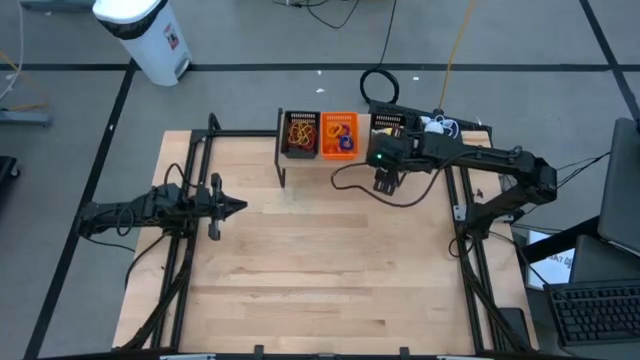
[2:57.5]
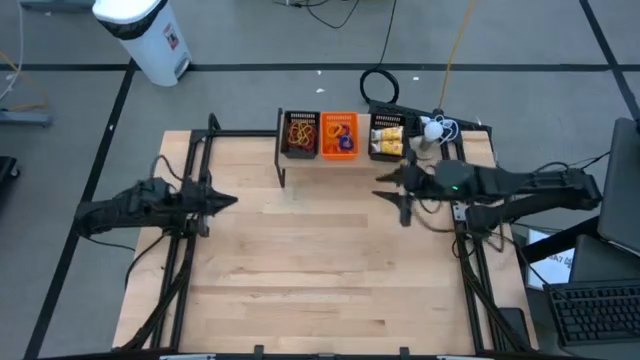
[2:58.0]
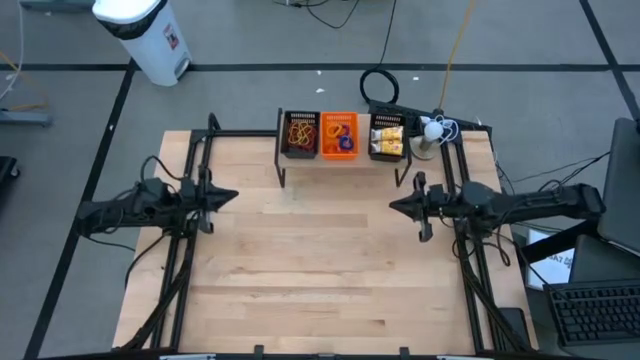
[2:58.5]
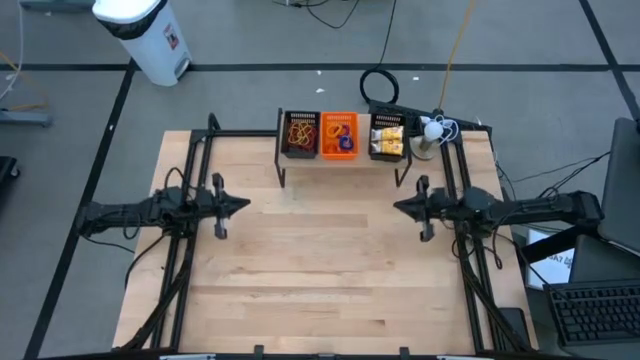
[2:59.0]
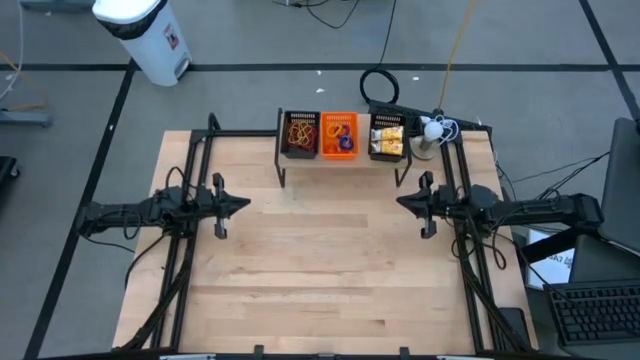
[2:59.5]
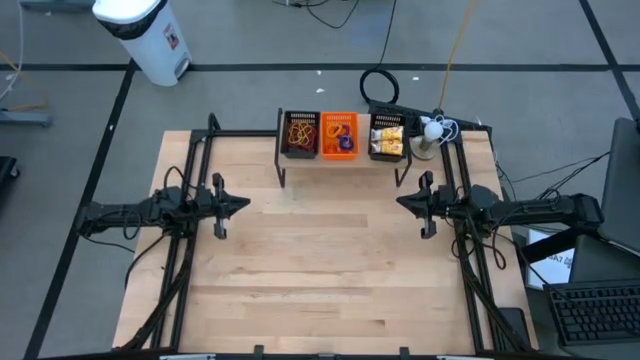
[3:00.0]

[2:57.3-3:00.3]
Task: Pick & Place Office Desk Supplies
Return to Home Position

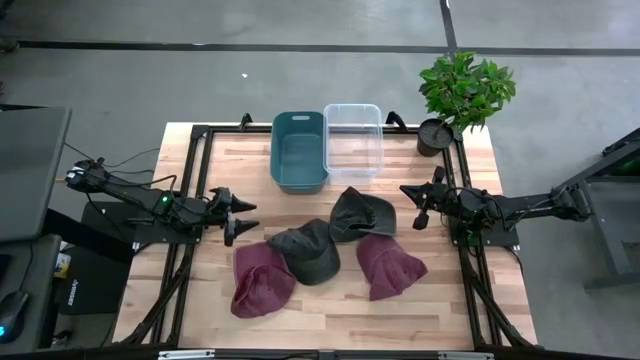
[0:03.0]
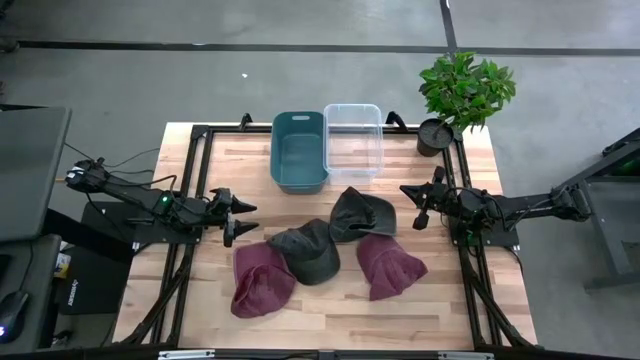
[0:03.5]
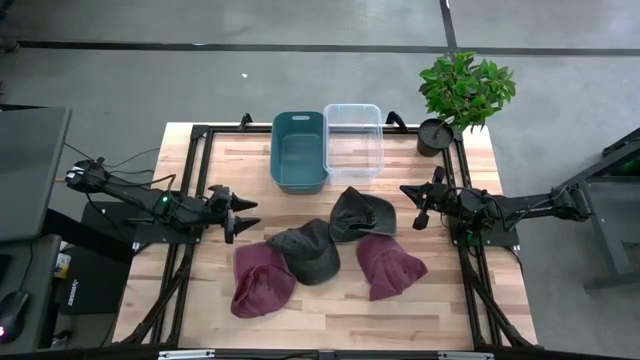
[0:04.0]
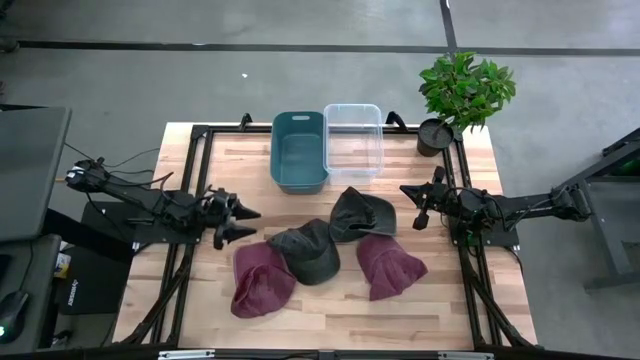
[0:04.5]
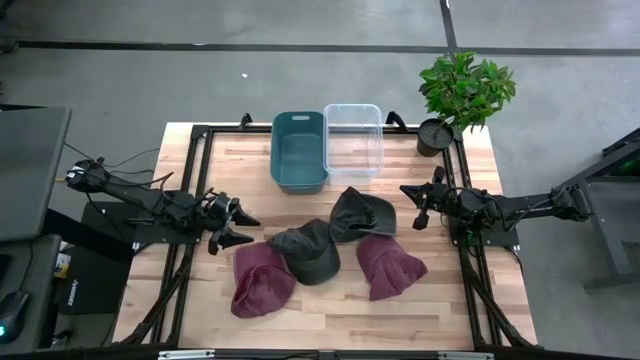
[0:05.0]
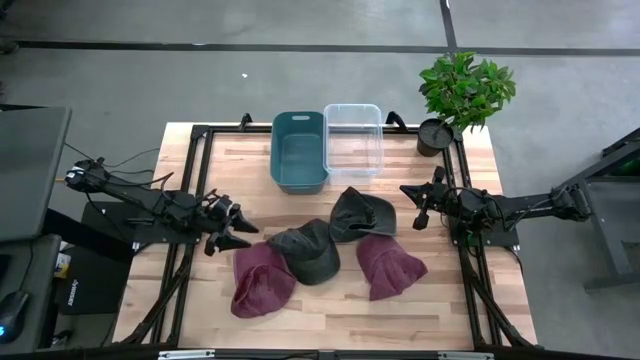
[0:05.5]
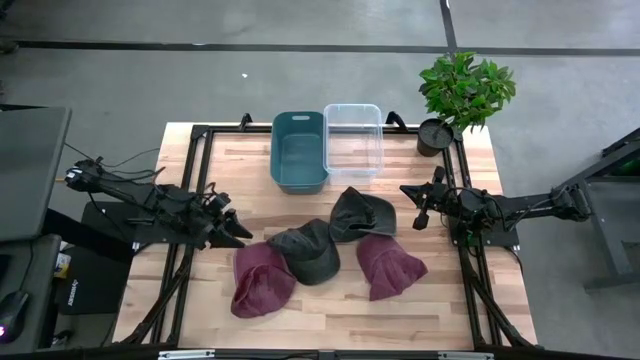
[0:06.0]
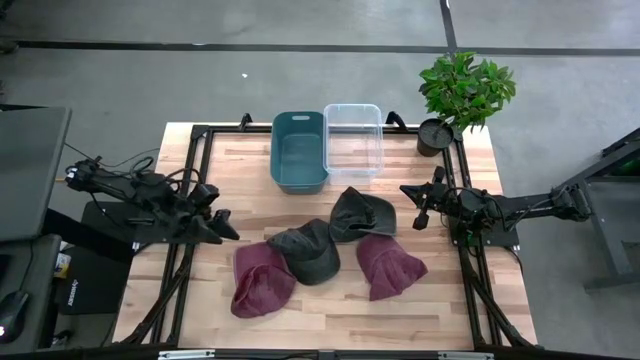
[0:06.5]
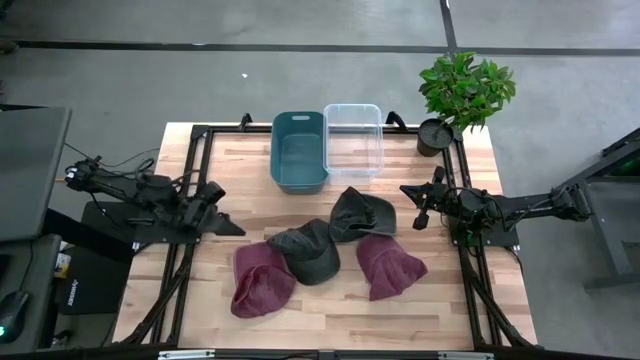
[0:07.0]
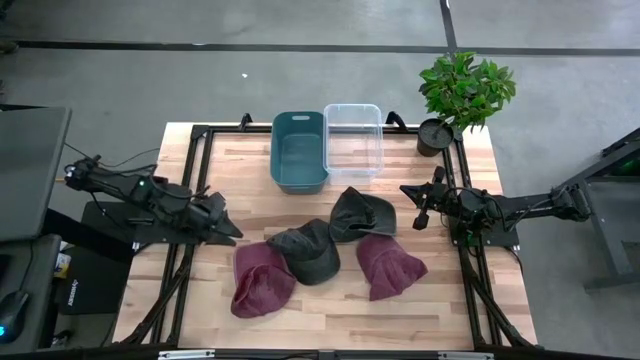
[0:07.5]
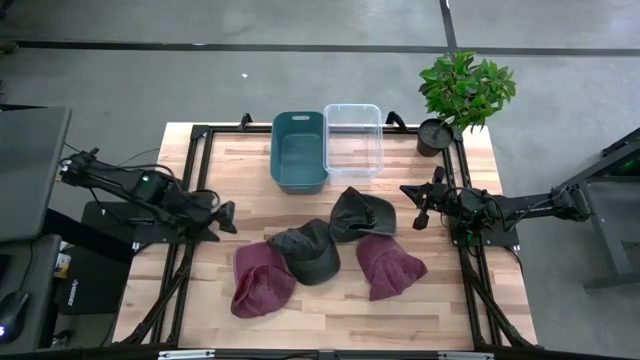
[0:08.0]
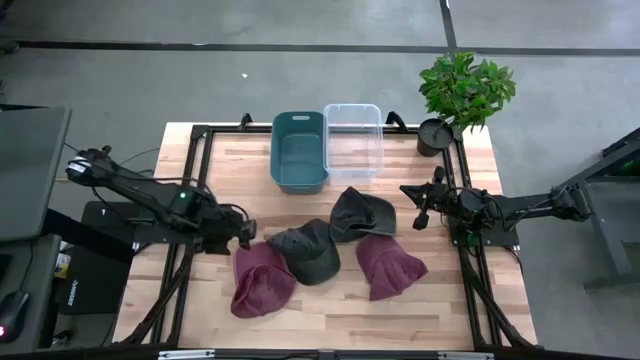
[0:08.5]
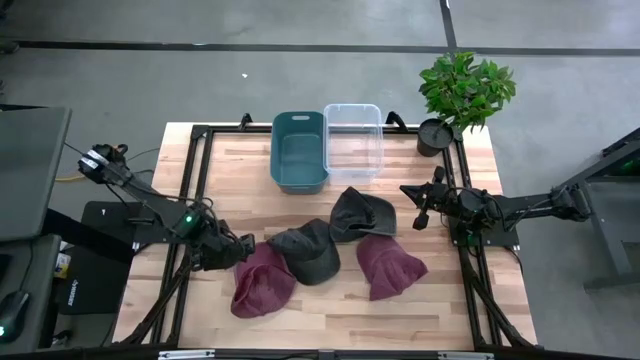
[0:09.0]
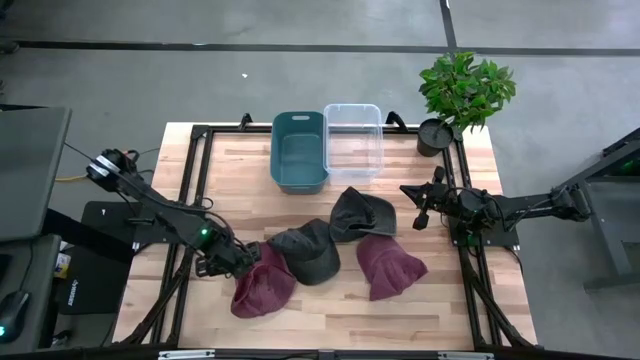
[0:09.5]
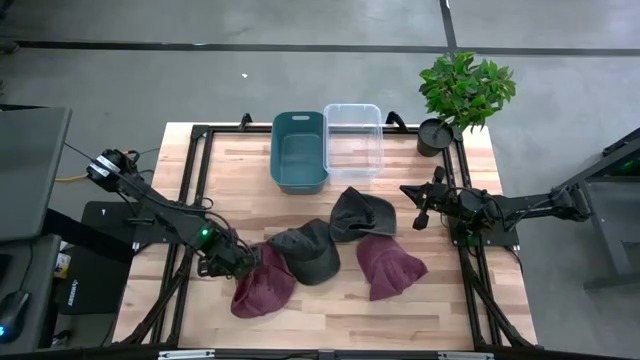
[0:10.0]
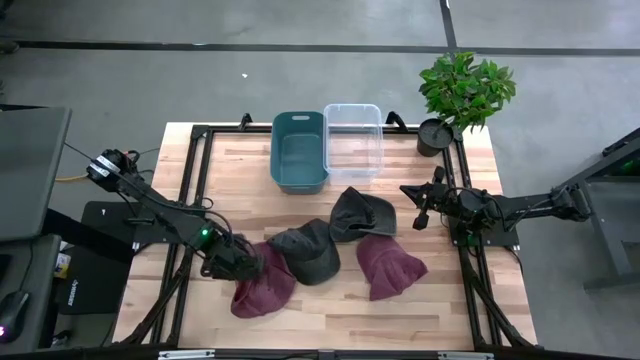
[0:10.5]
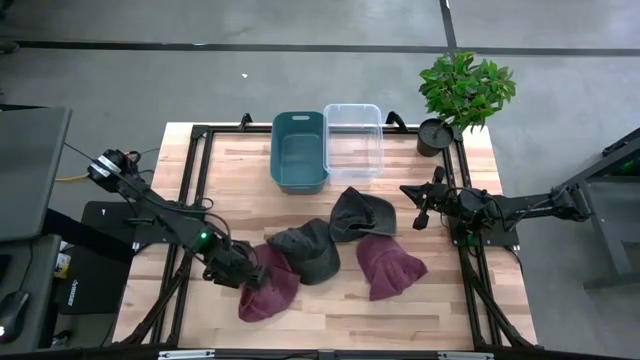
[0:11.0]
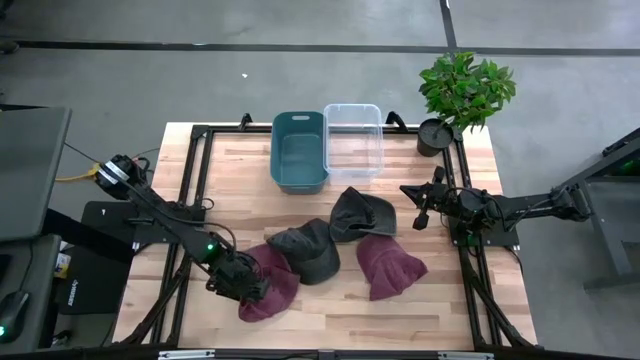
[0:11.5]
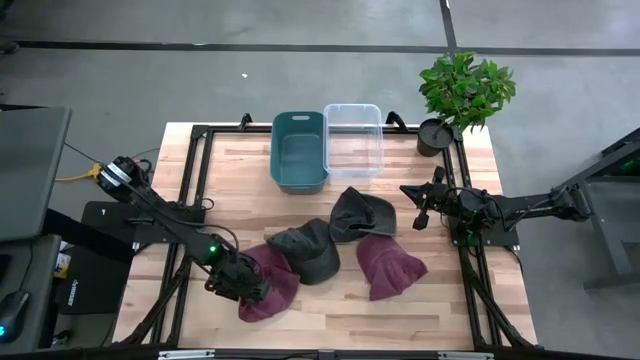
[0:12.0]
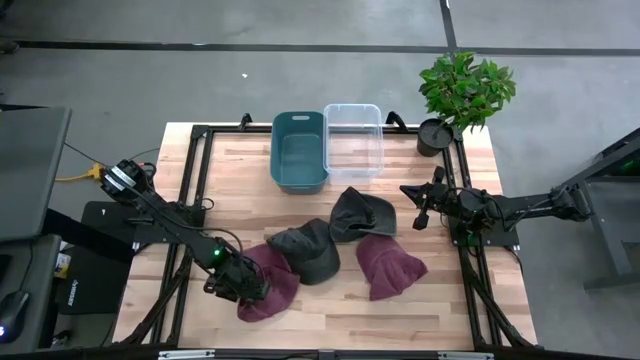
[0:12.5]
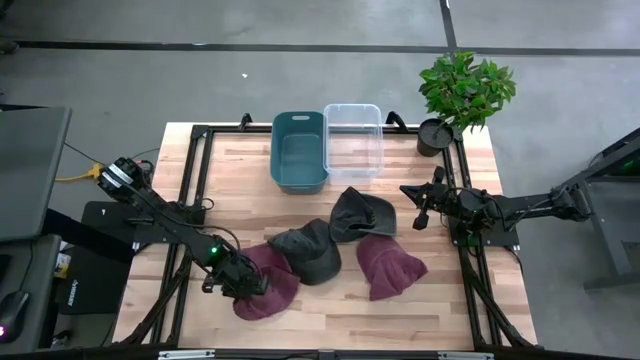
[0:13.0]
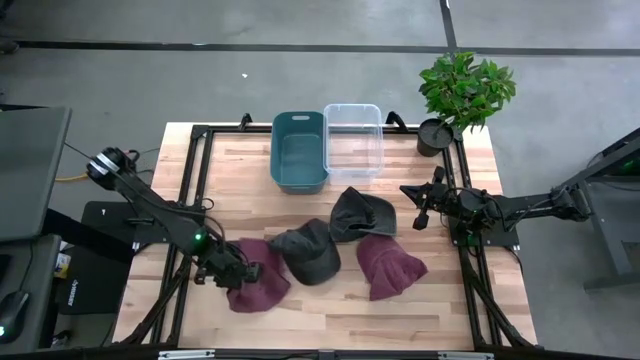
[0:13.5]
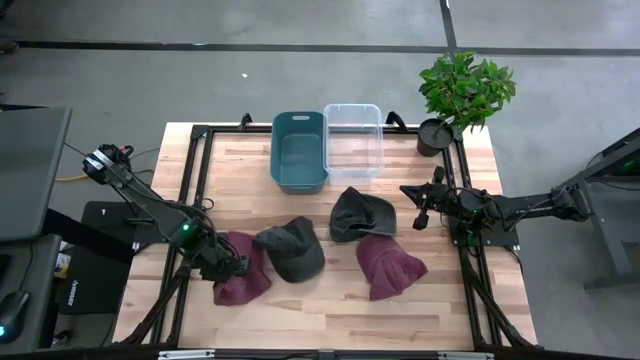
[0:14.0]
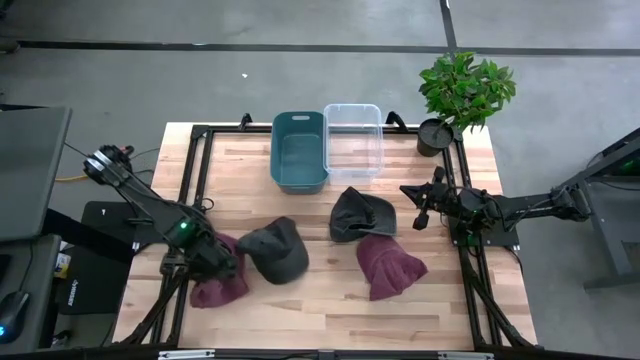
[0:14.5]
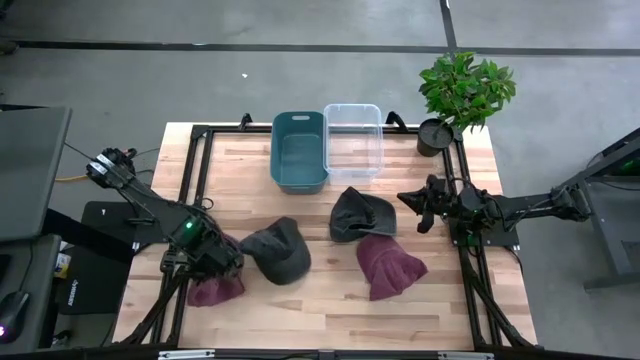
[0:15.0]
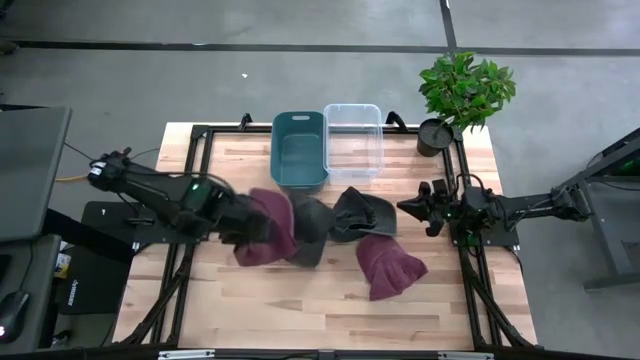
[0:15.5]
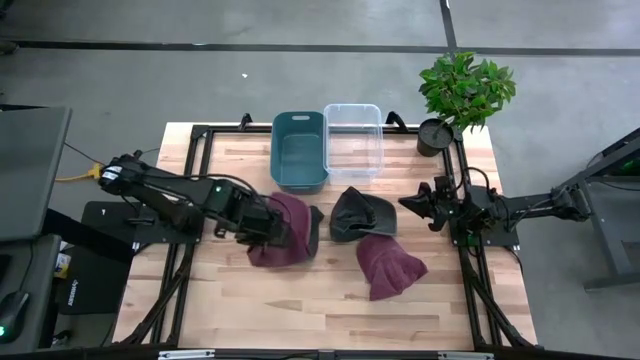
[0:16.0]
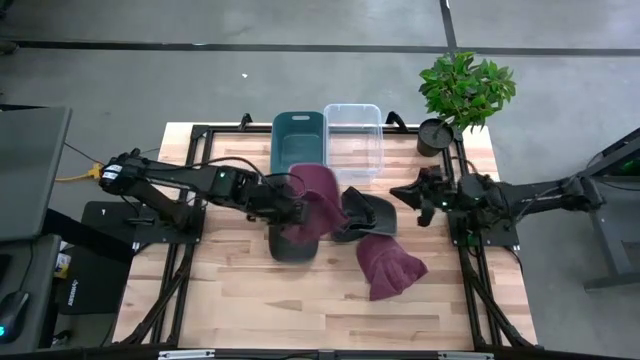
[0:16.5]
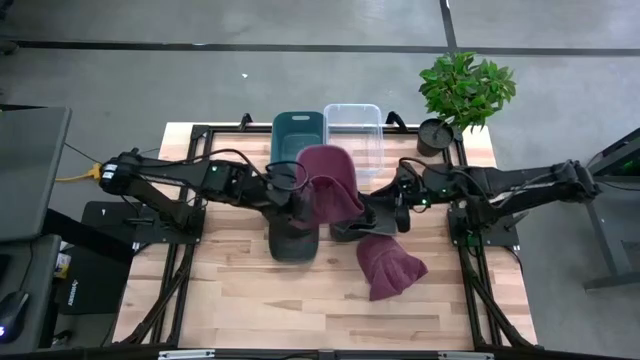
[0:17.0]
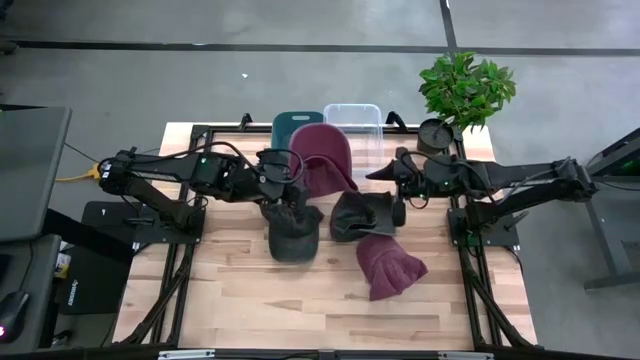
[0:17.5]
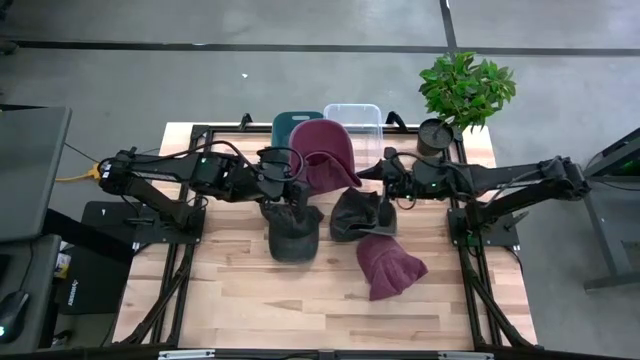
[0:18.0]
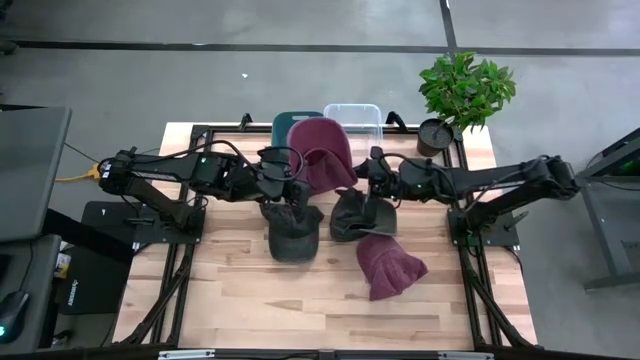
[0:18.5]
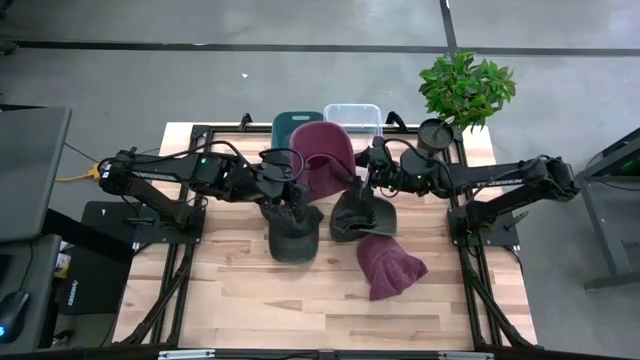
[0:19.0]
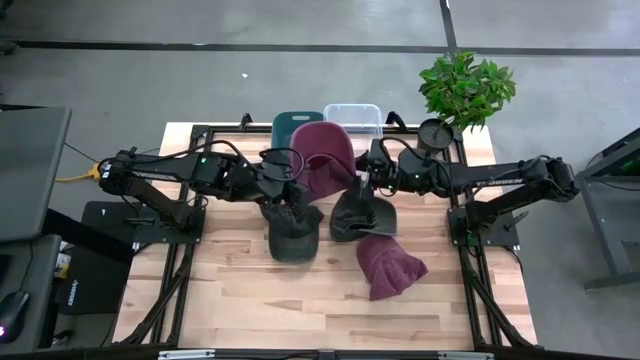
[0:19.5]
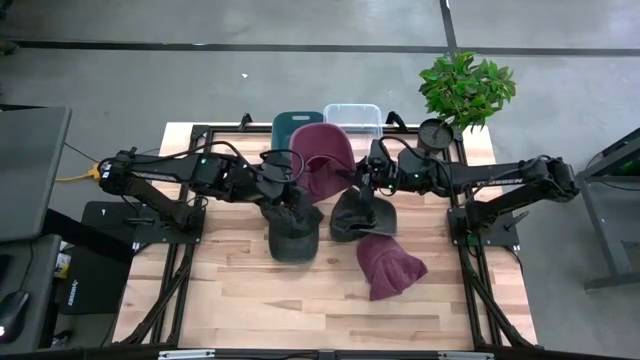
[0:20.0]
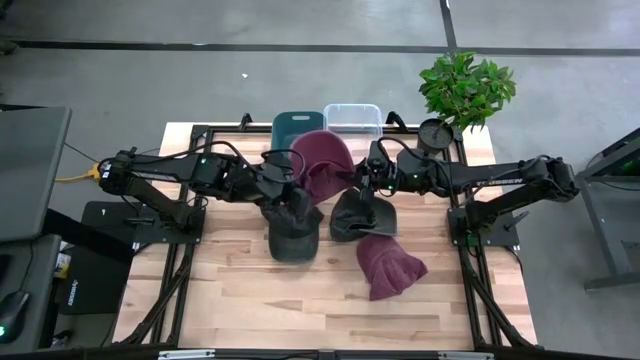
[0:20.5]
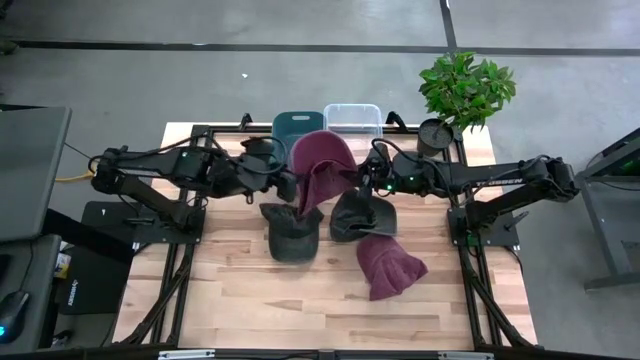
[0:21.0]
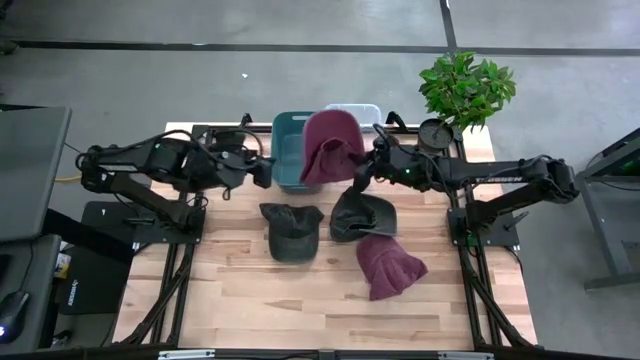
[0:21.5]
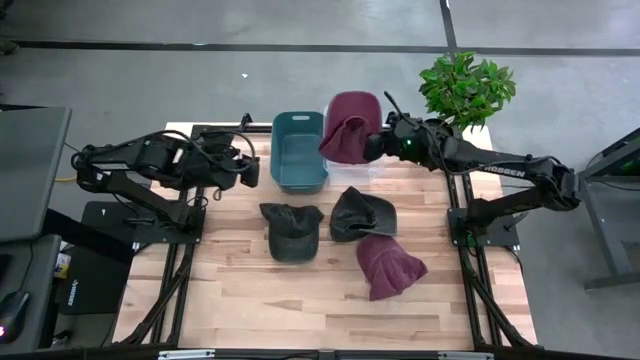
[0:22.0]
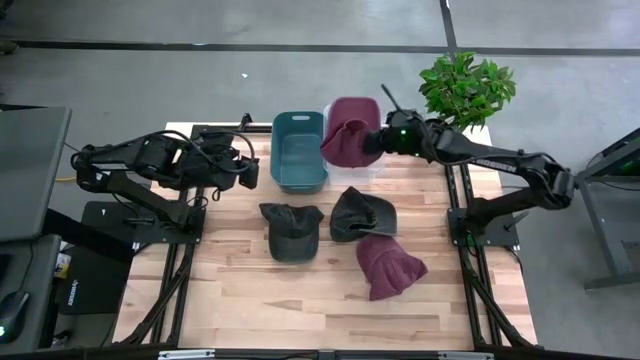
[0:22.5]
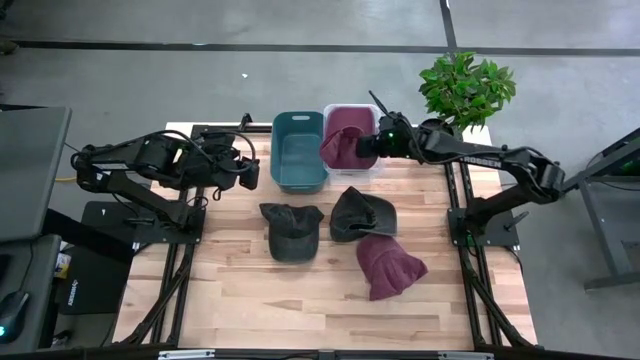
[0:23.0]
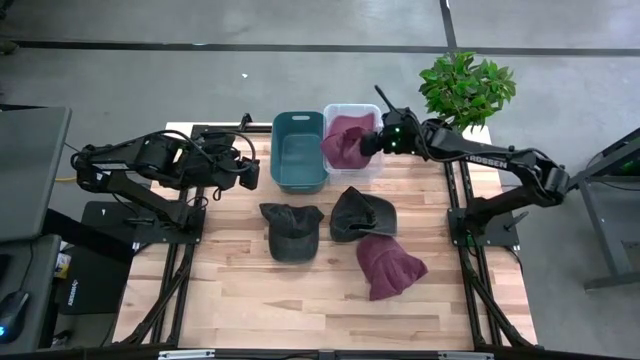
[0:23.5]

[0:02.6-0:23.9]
Task: Pick & Place hat
Put the left red cap into the transparent bin
